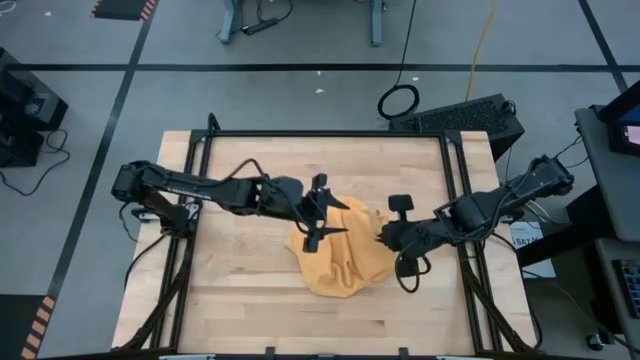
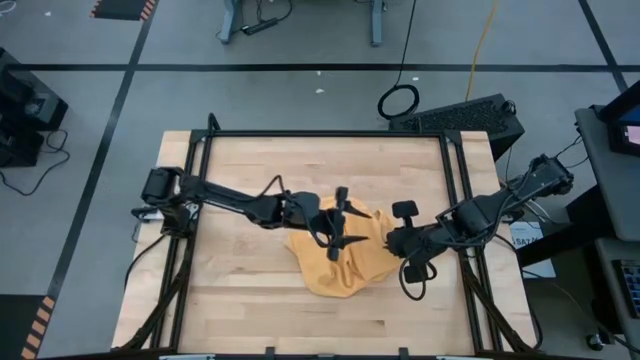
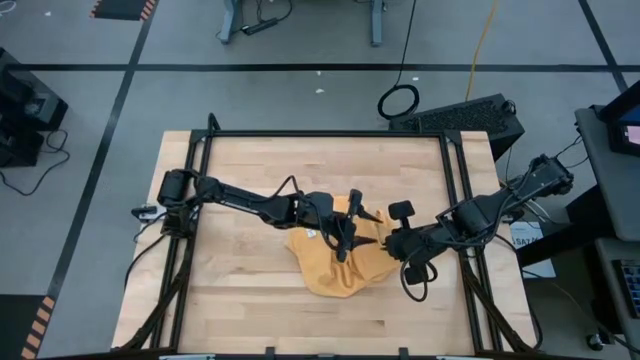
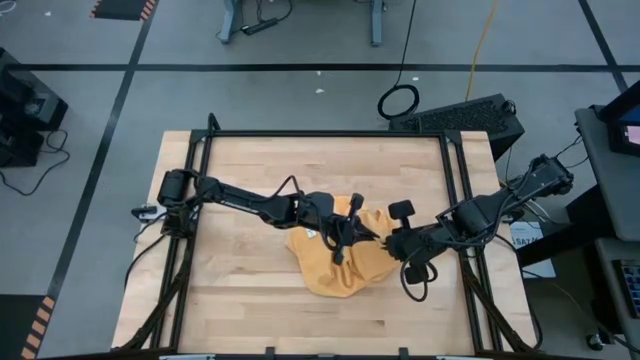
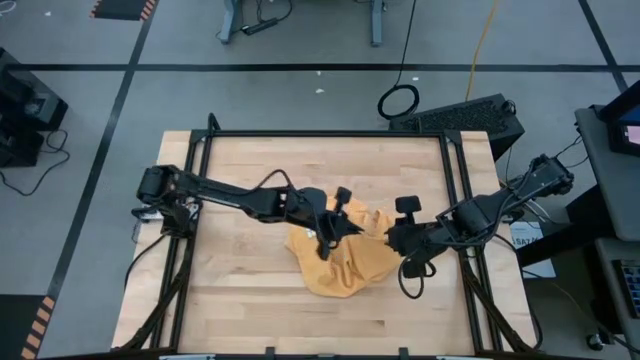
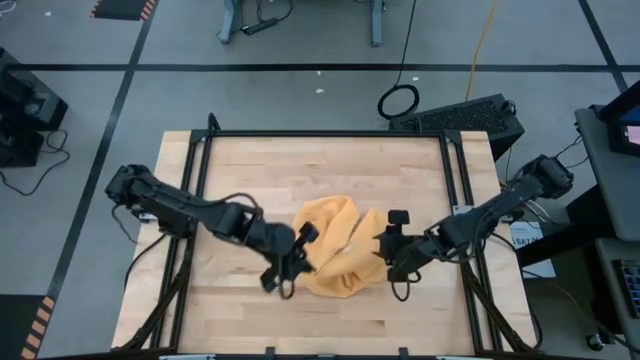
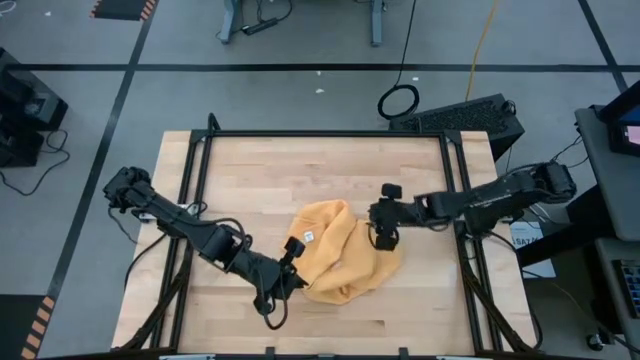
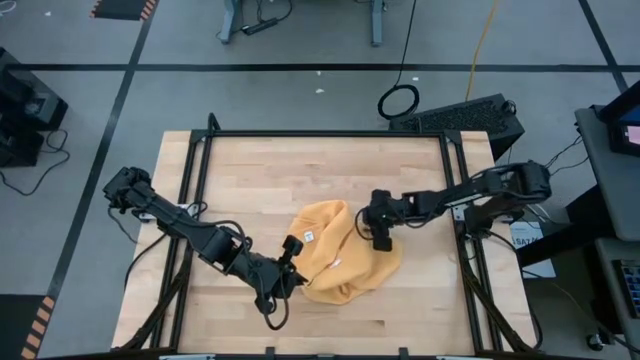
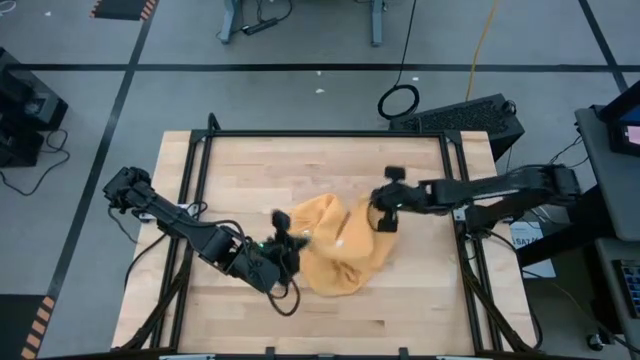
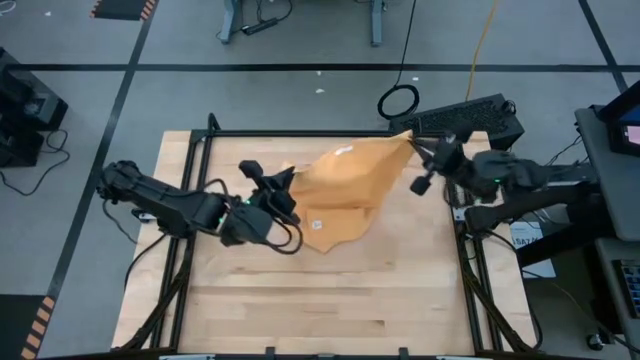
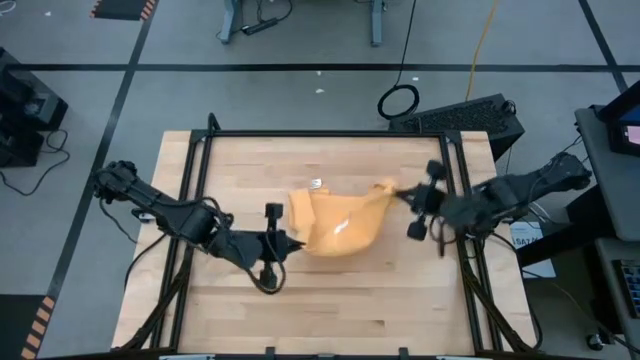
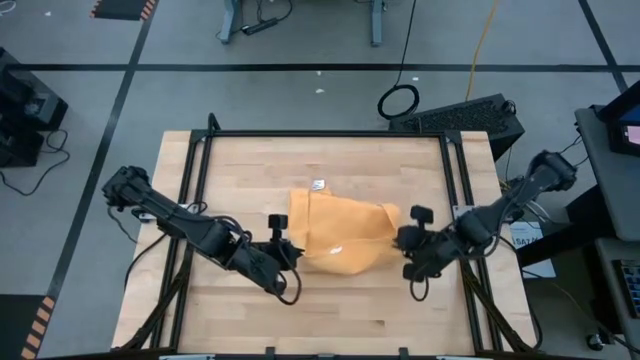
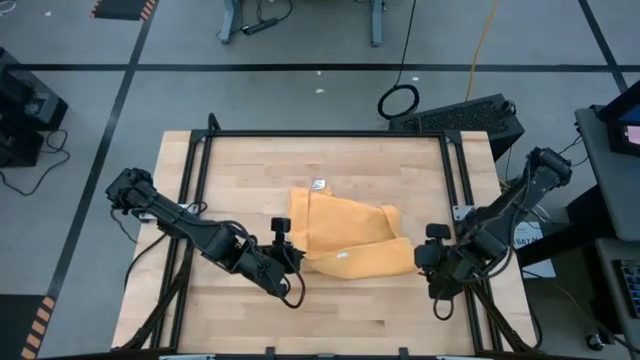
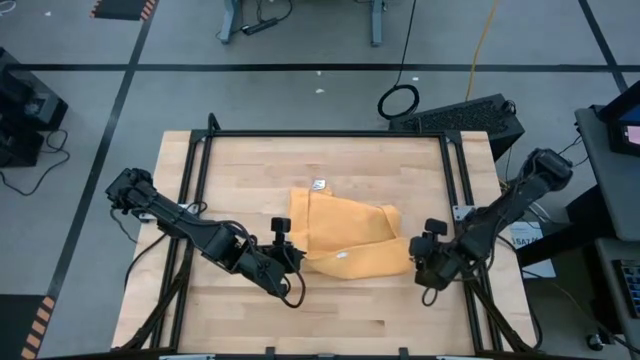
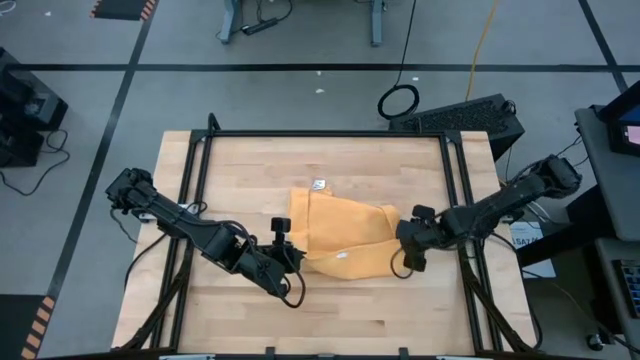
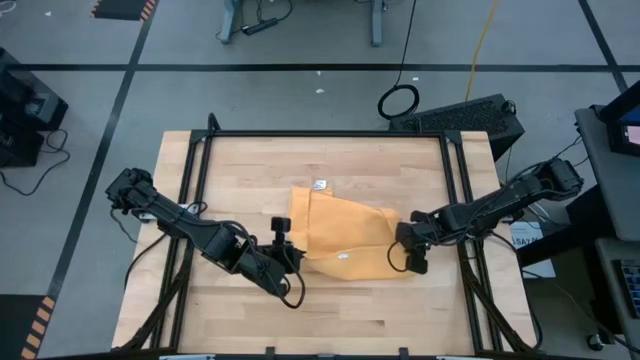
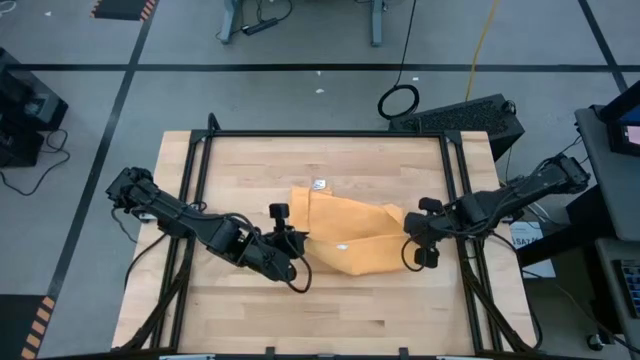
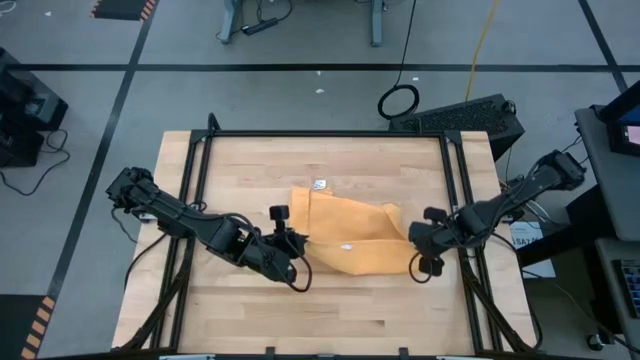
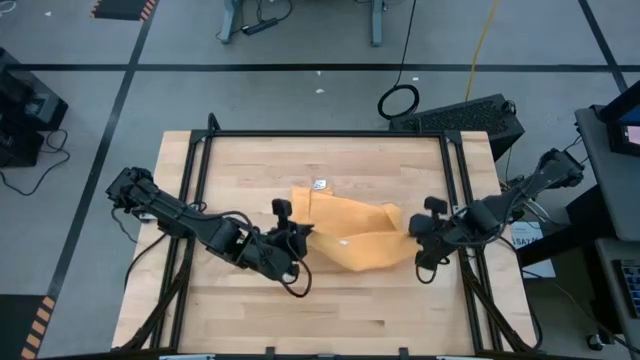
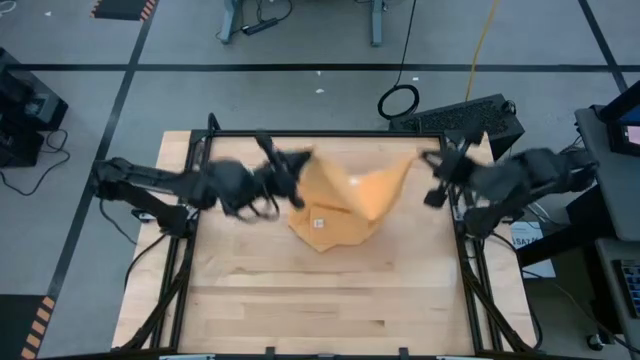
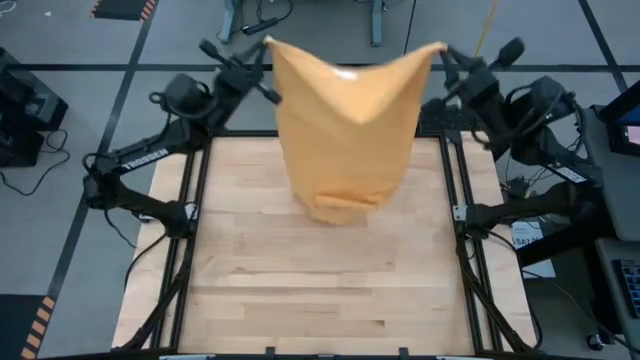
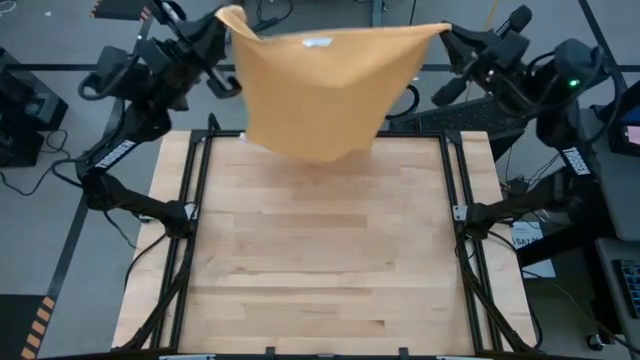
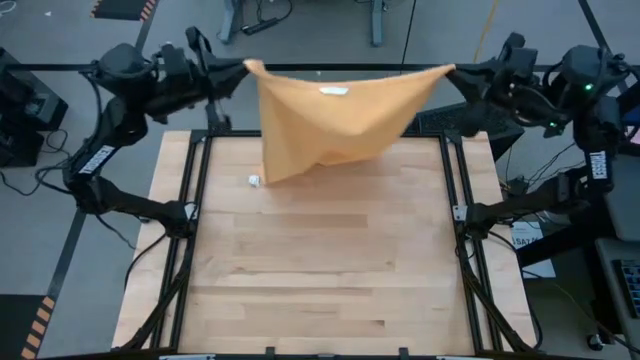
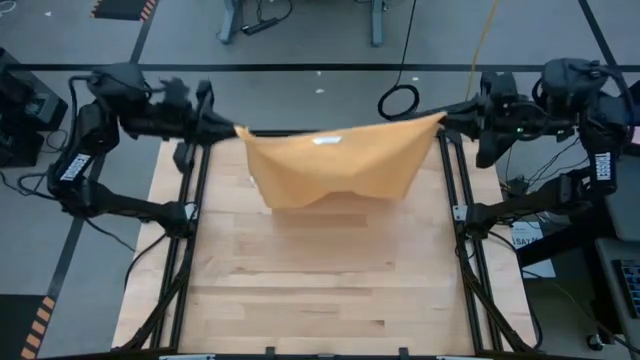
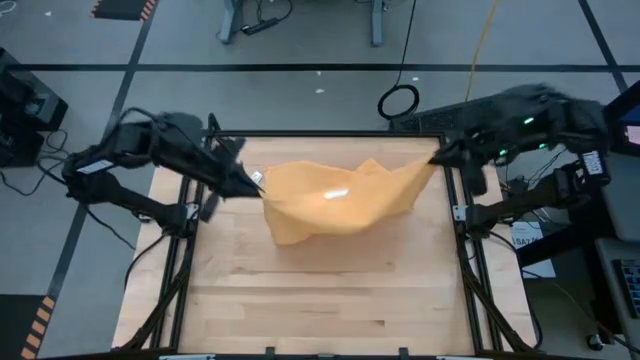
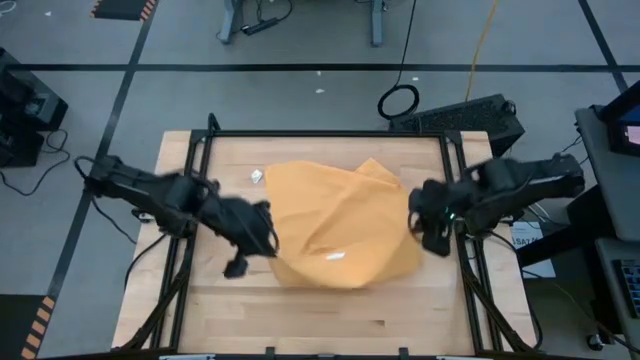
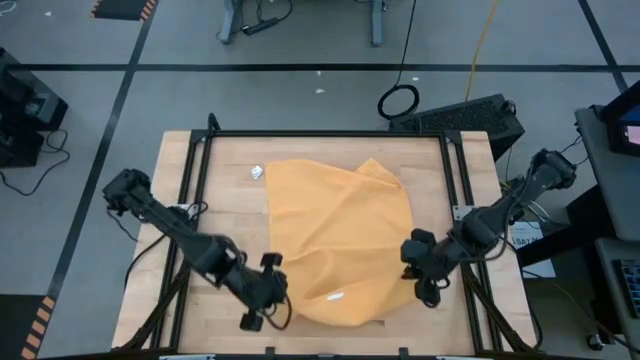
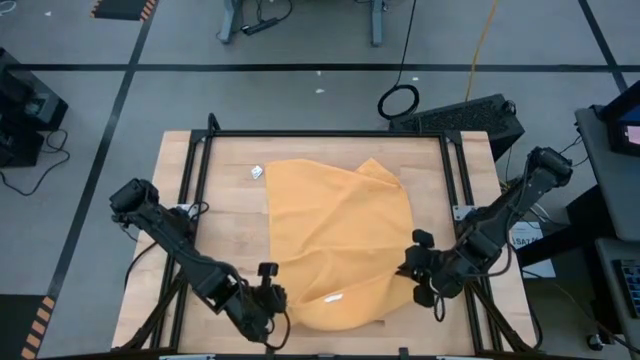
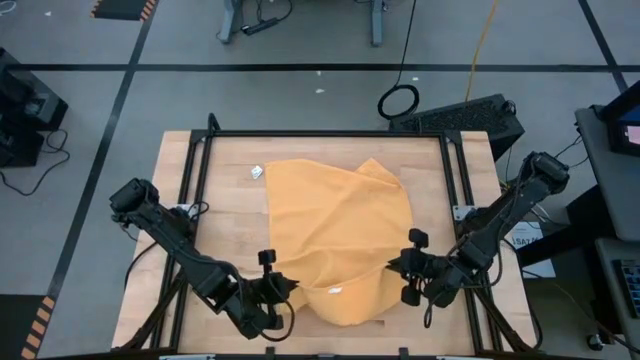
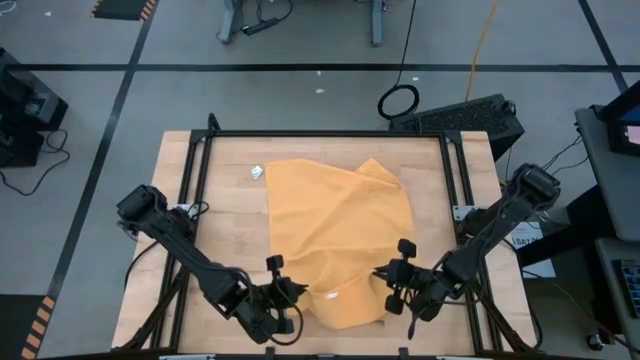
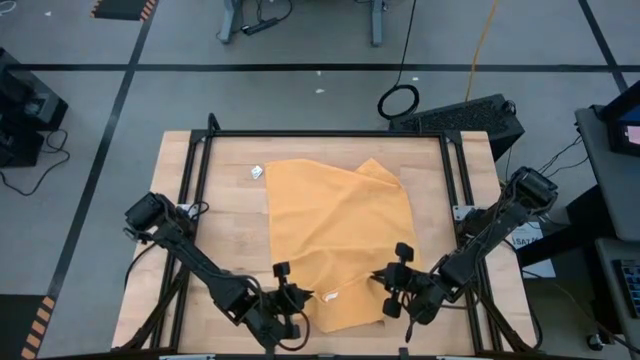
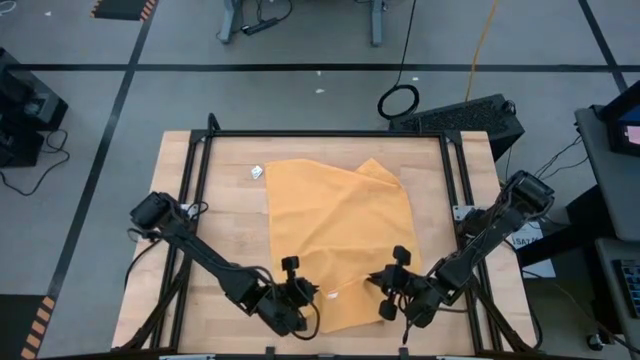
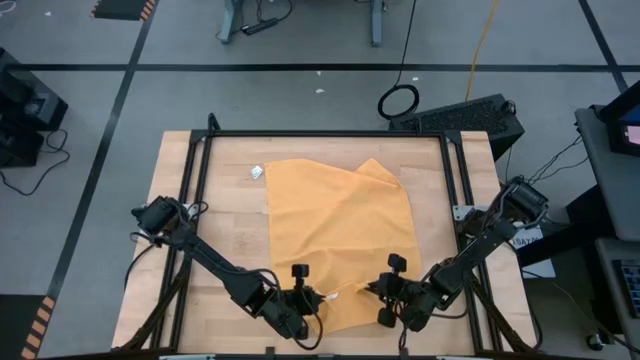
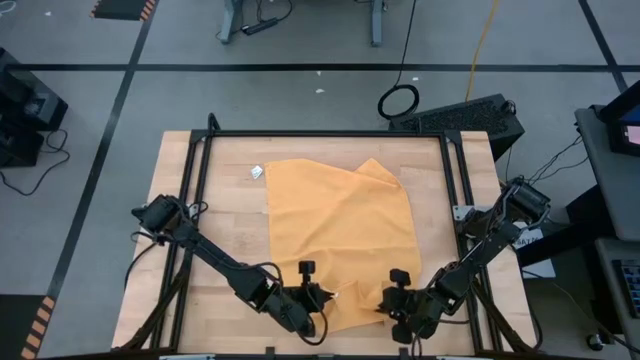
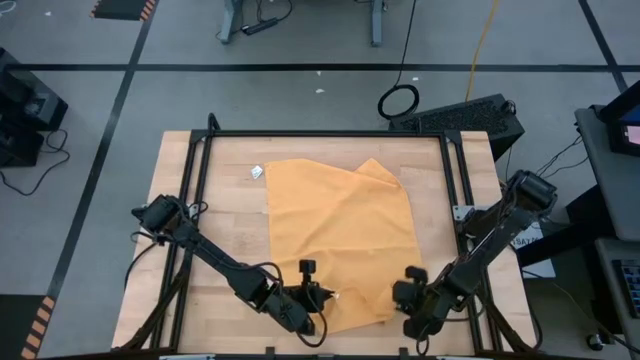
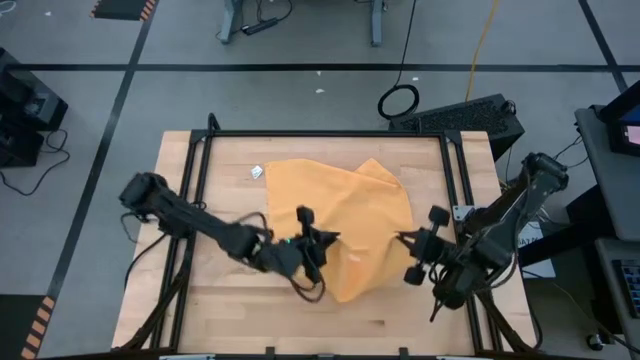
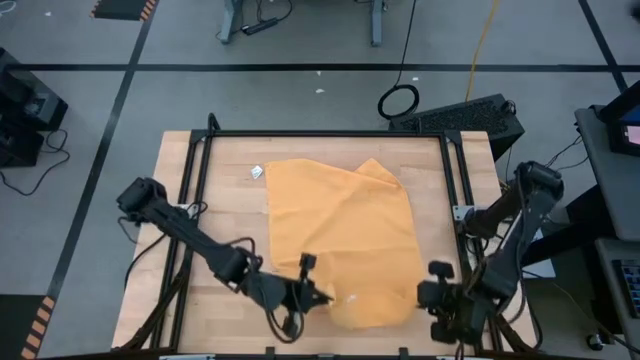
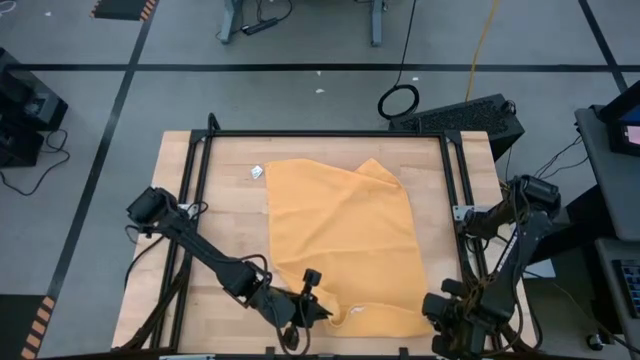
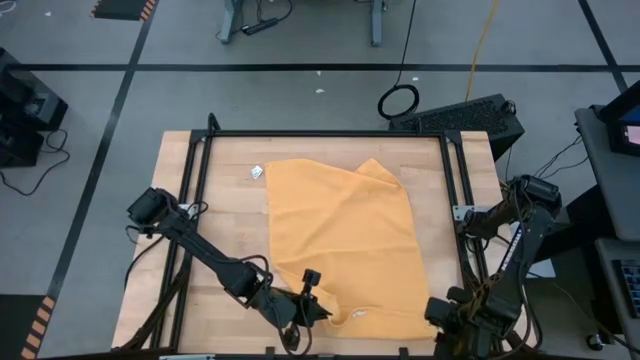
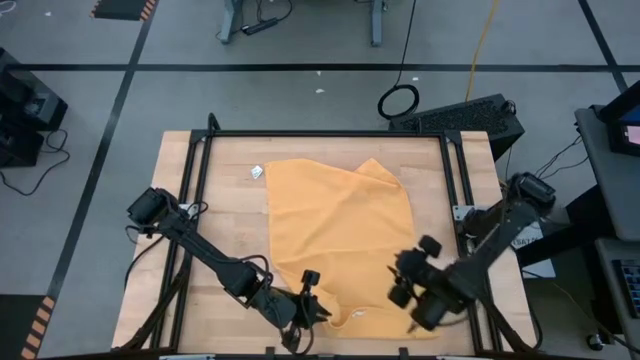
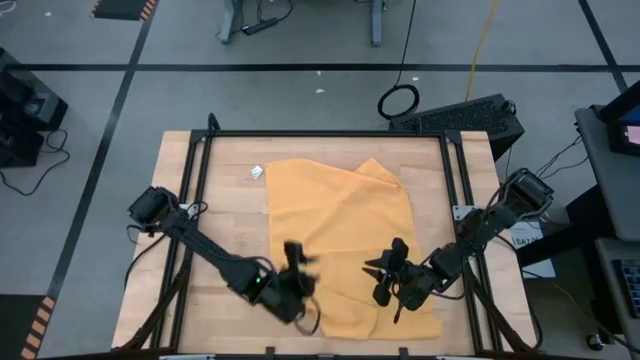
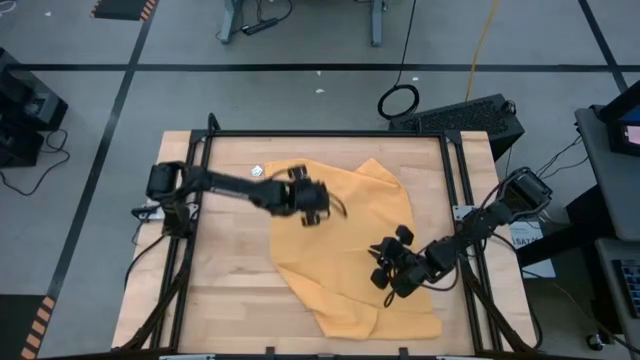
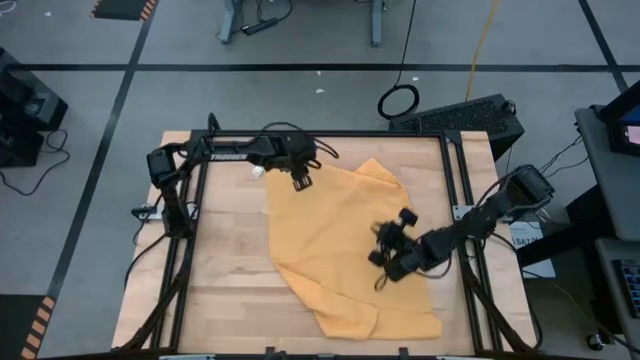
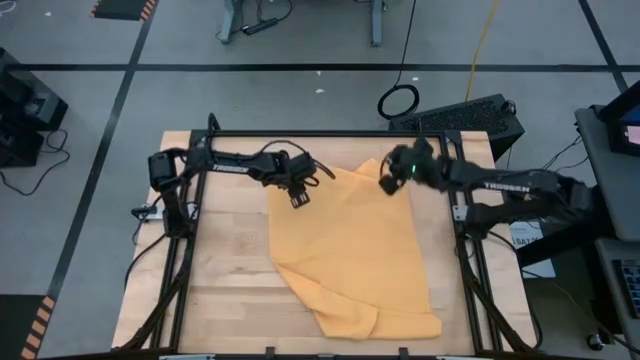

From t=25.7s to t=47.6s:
Task: Roll towel
Fold the yellow towel
